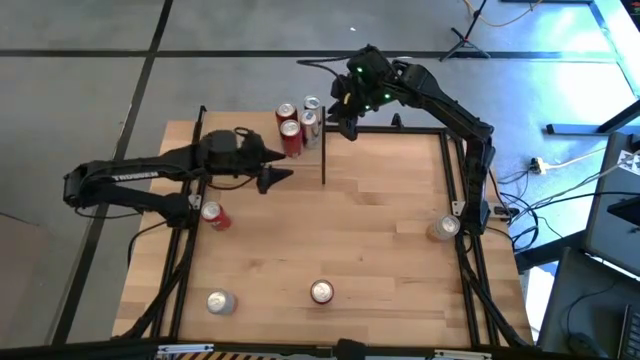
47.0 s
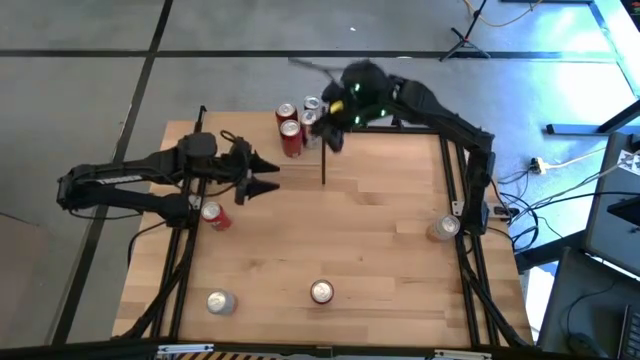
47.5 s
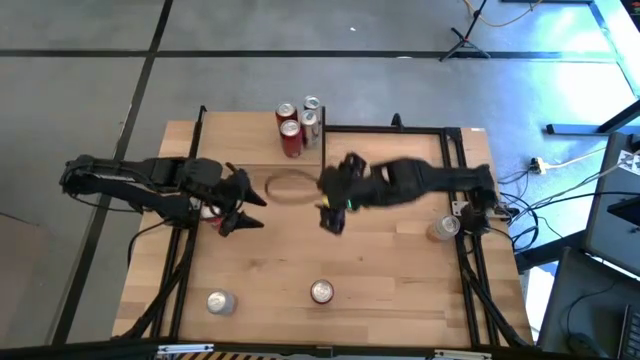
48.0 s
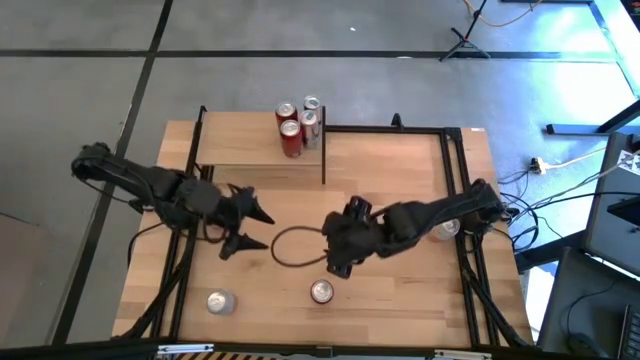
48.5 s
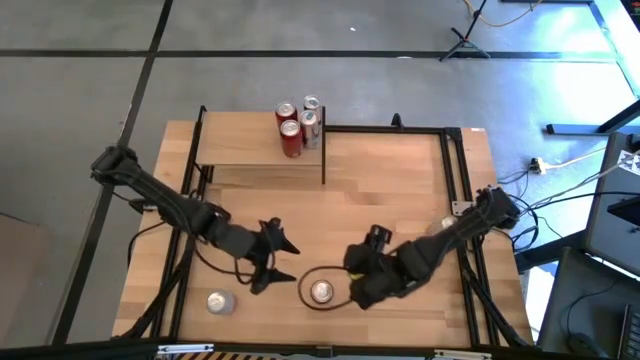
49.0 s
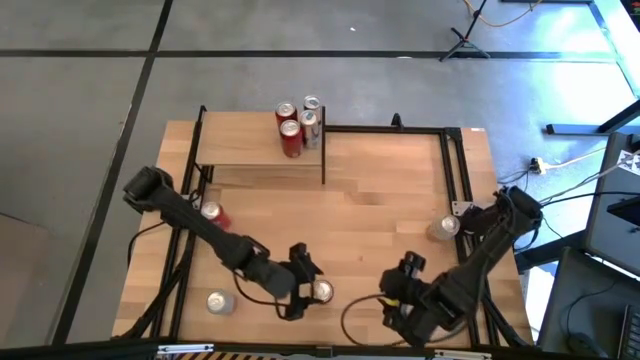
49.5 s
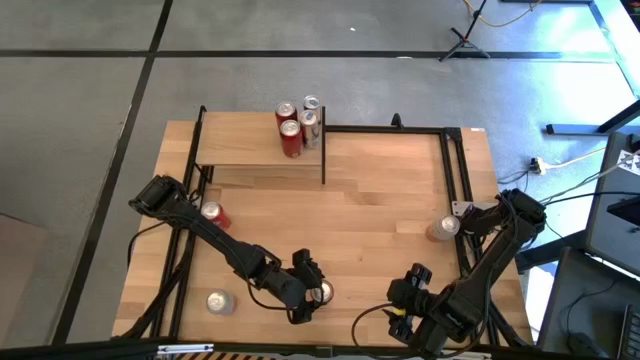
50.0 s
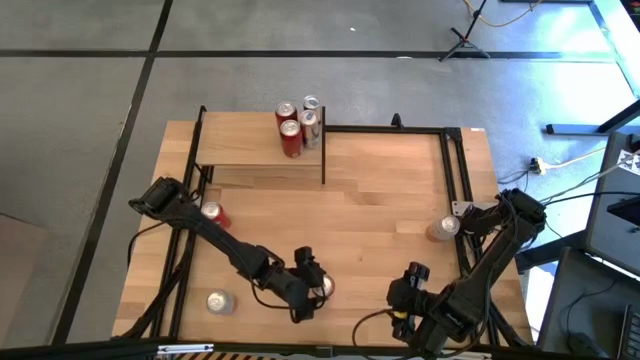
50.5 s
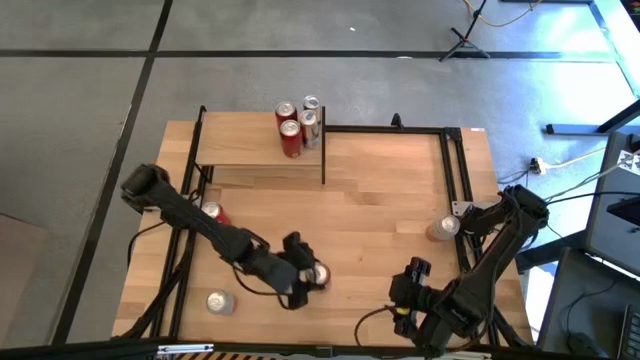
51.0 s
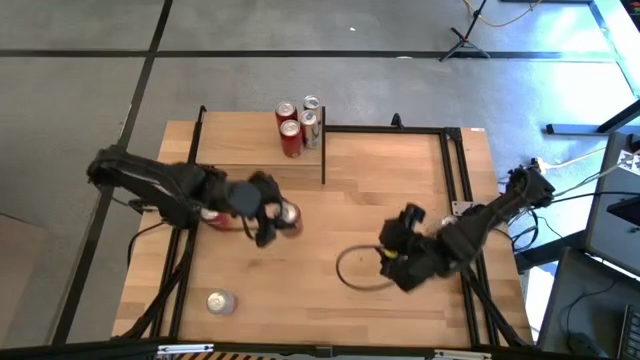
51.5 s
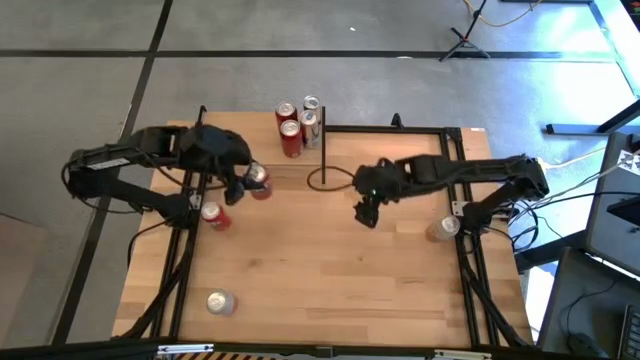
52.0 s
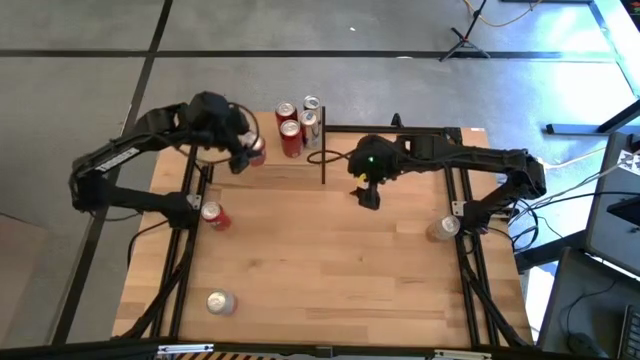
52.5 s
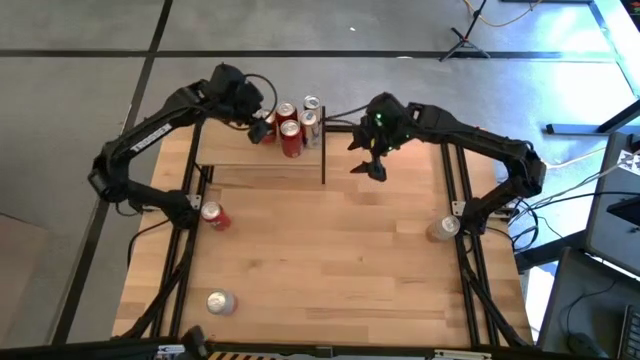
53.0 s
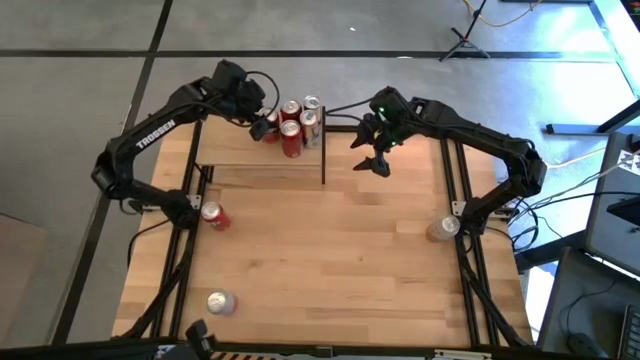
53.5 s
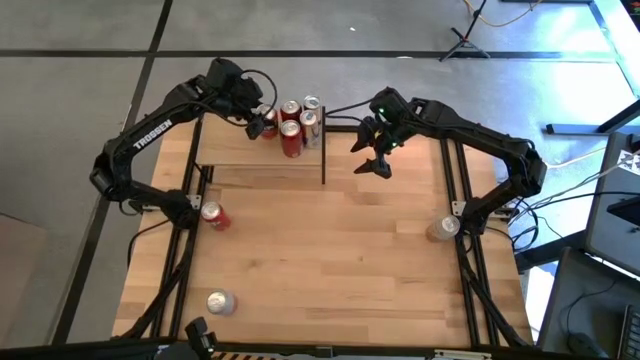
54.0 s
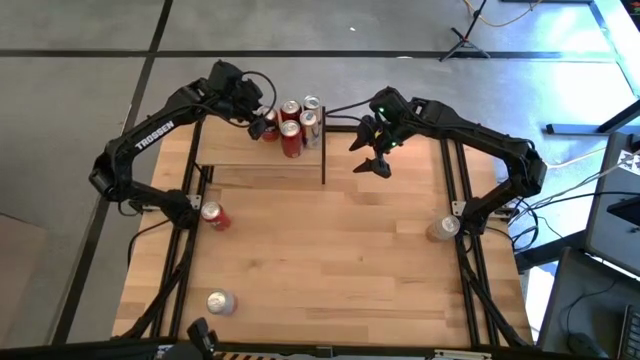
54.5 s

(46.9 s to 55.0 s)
Task: Place canned beverage on shelf
Put the bottom red soda can on the shelf

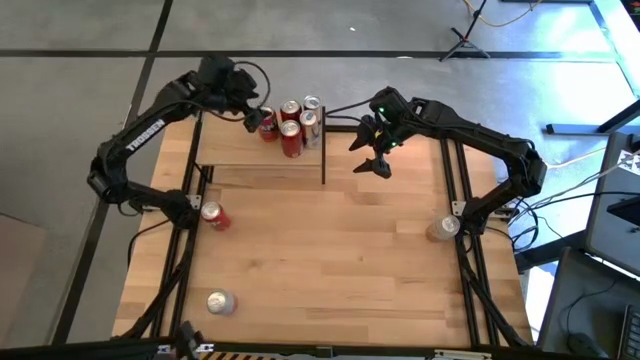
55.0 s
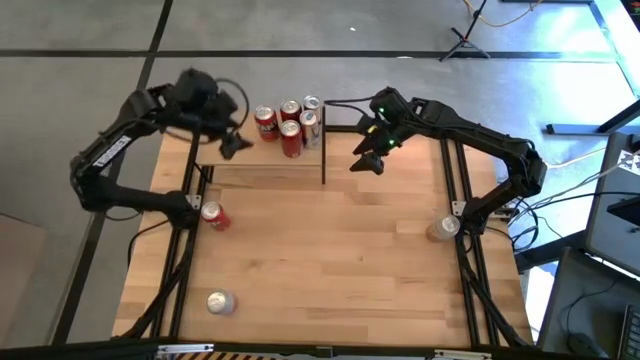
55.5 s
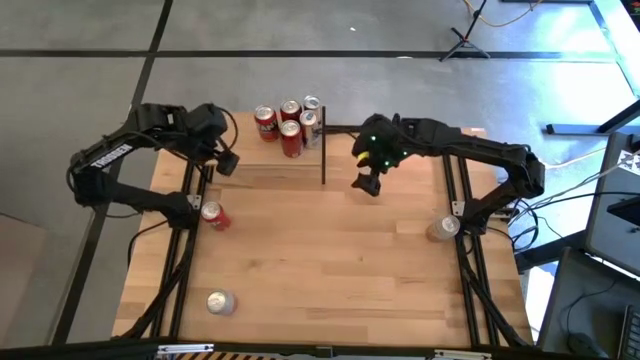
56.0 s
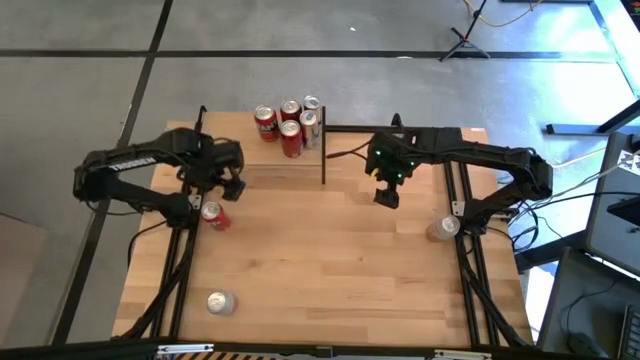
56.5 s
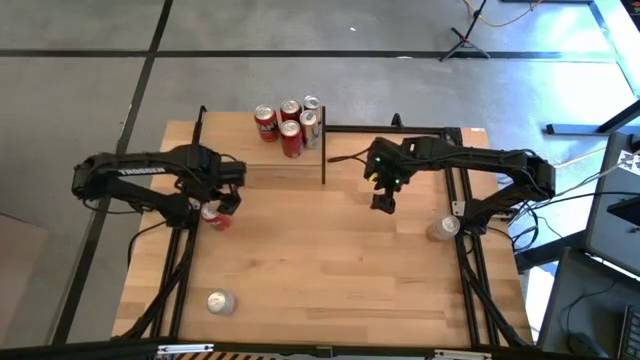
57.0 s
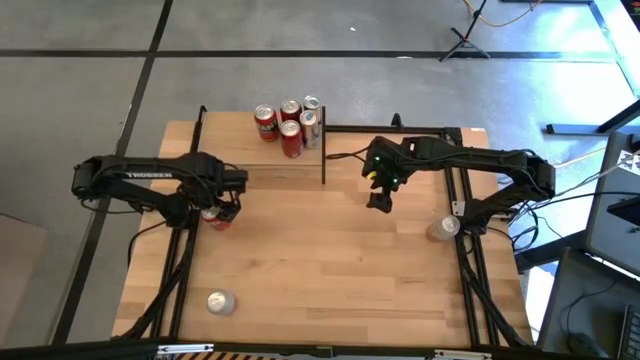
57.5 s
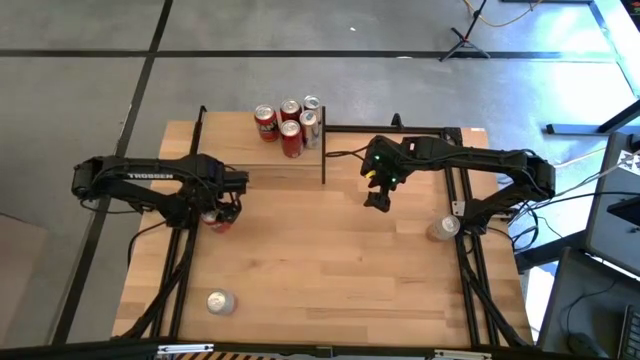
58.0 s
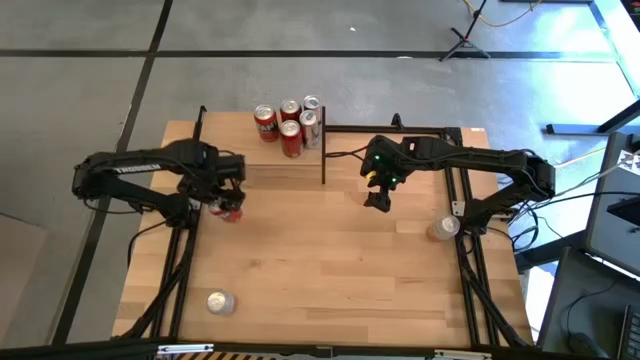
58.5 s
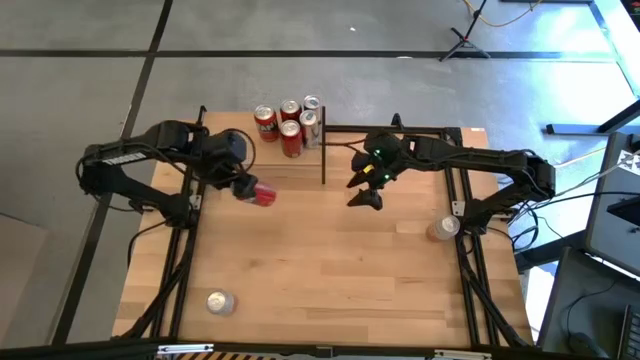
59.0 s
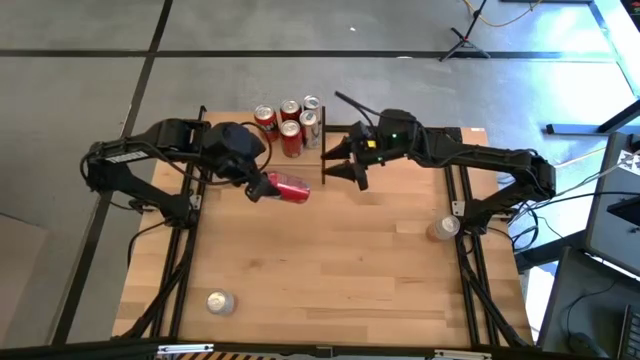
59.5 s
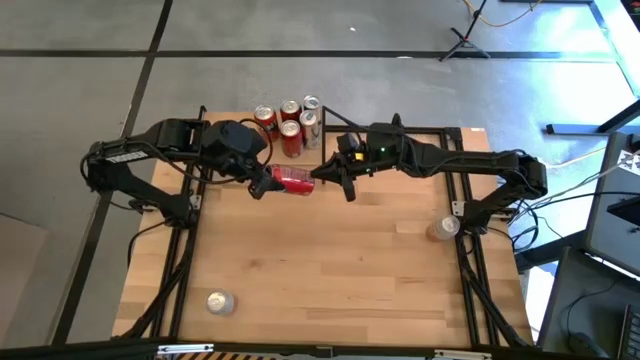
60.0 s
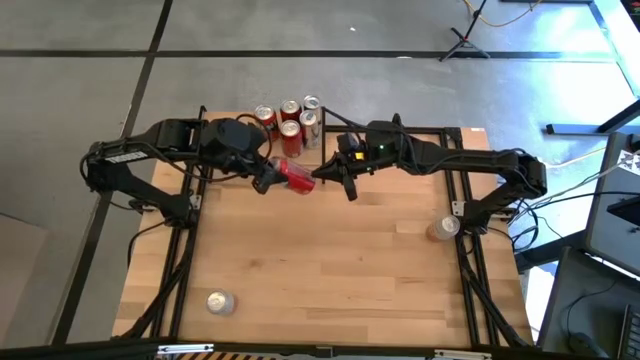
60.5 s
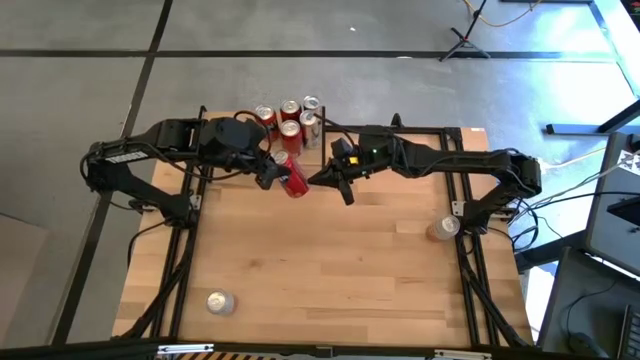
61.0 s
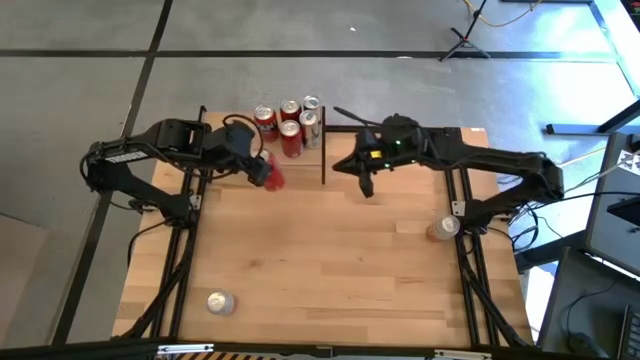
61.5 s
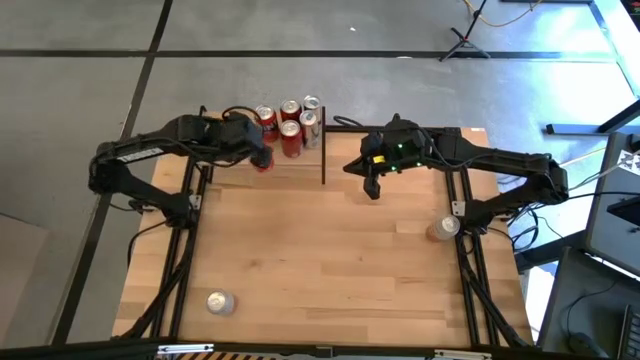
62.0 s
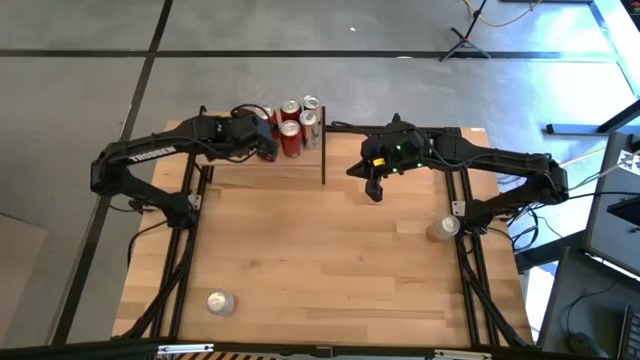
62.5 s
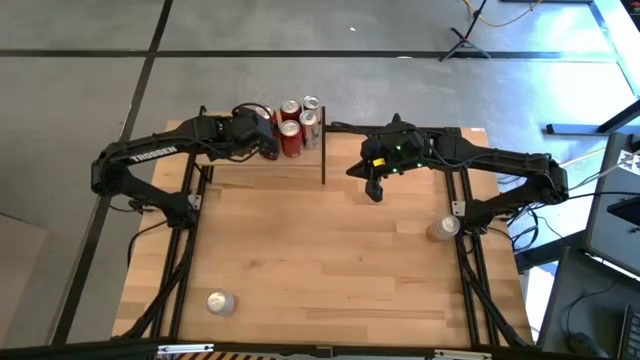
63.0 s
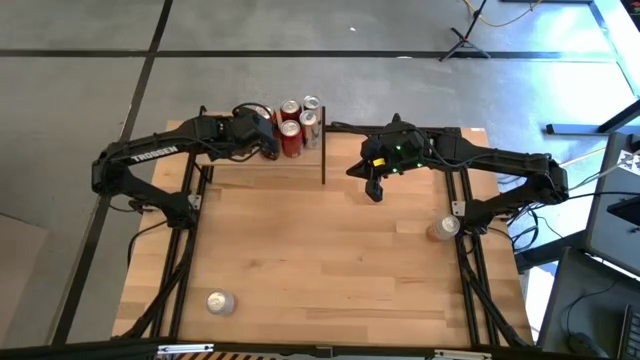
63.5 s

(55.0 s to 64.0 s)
Put the red soda can on the shelf aligned with the other red soda can

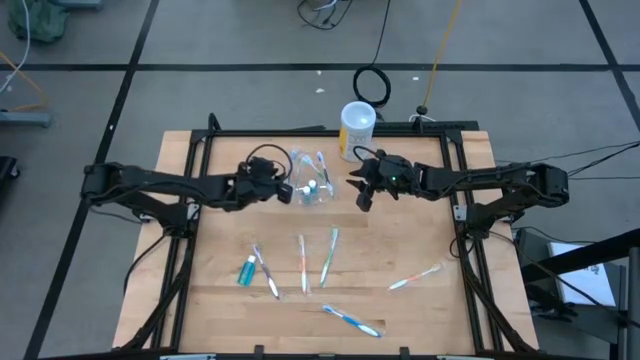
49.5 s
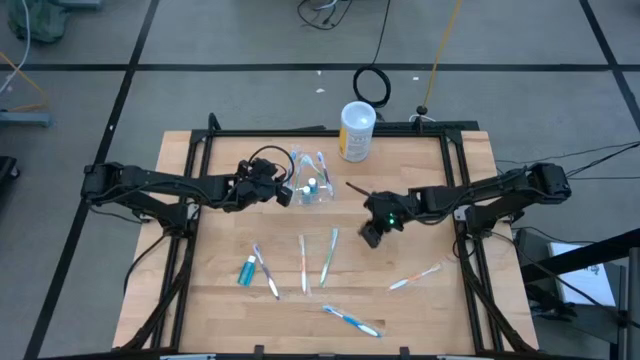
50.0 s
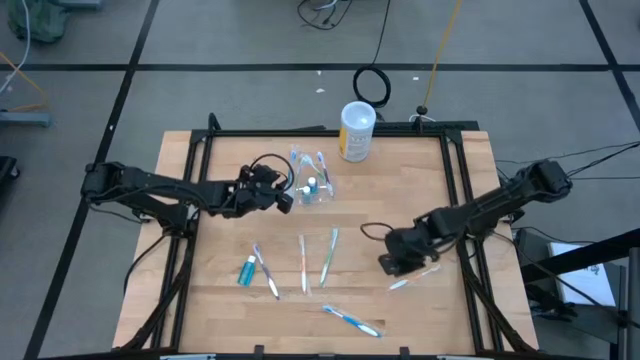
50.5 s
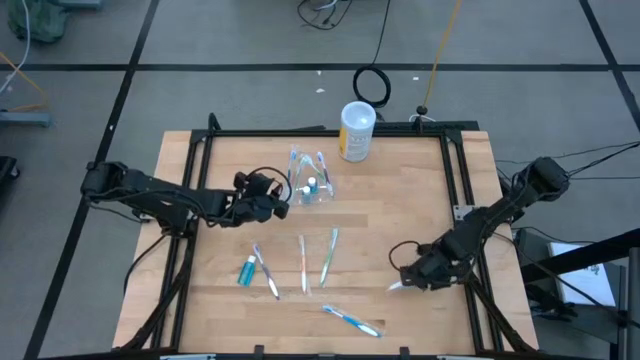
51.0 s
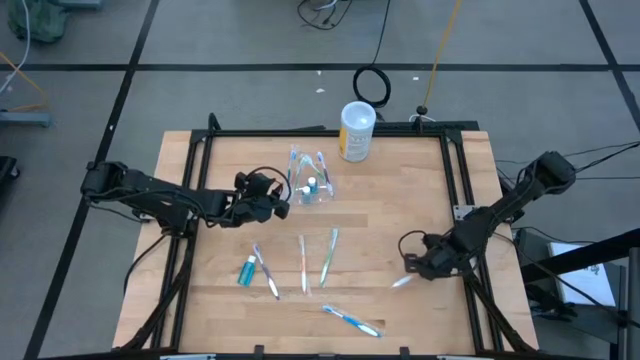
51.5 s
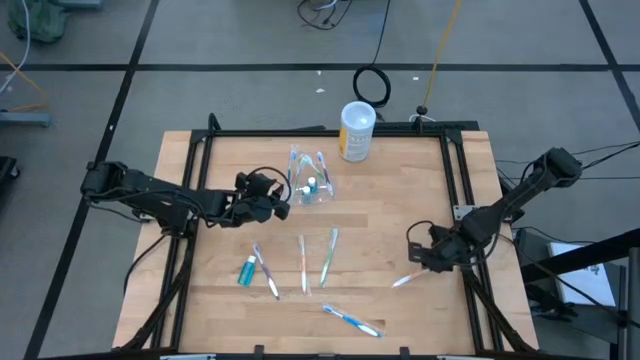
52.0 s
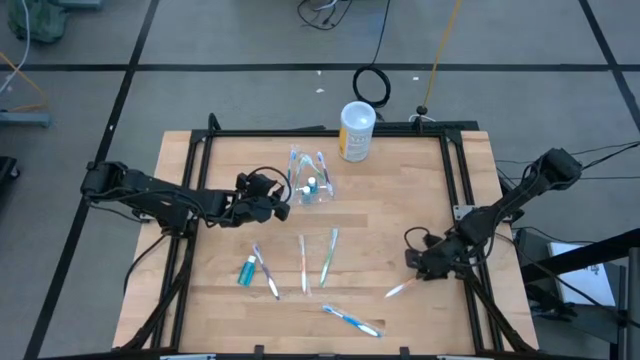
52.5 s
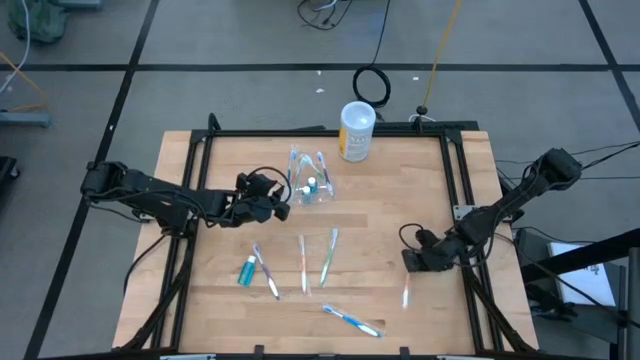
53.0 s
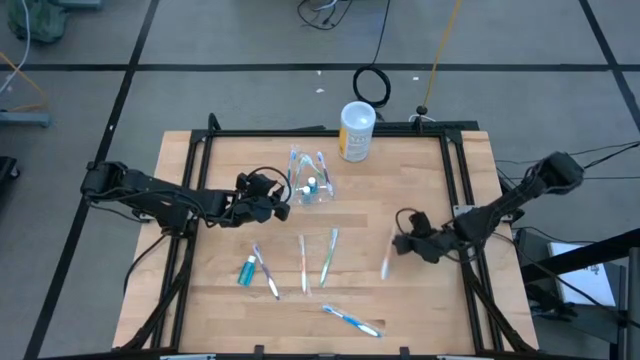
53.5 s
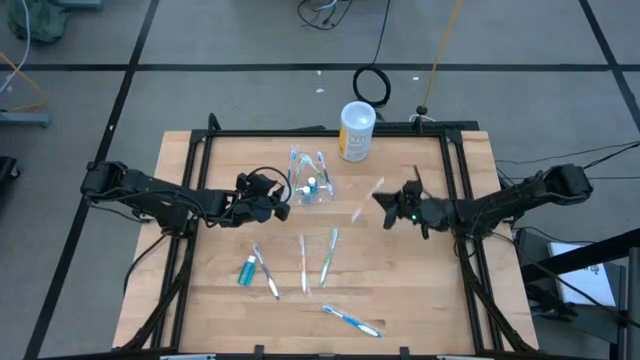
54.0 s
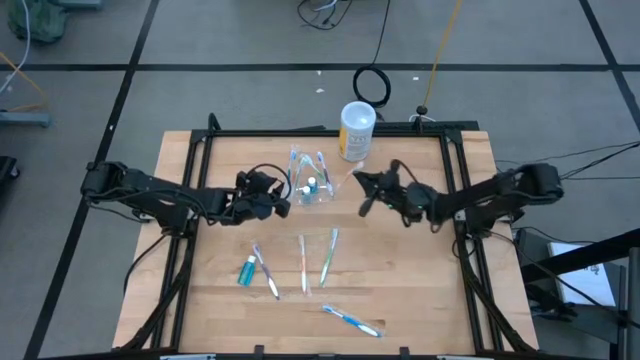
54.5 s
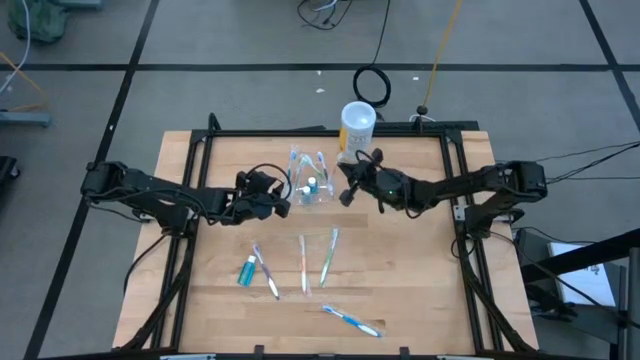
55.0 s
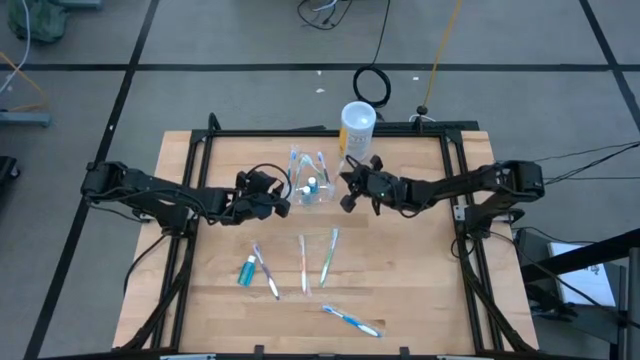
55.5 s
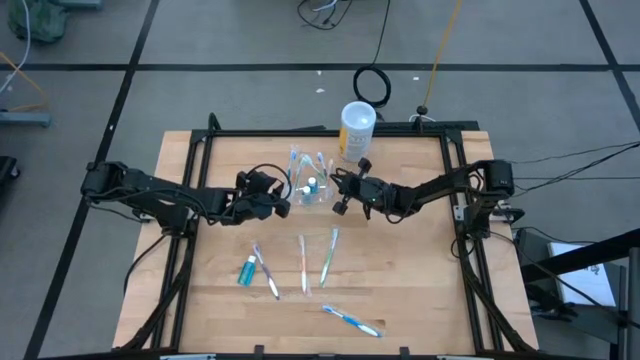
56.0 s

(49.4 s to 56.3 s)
Task: Pick & Place toothbrushing station
Put the right orange toothbrush into the transparent organizer
